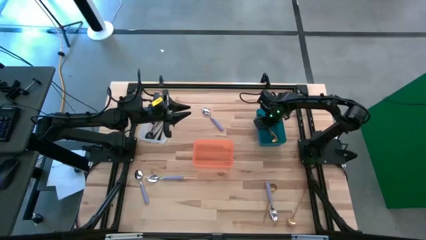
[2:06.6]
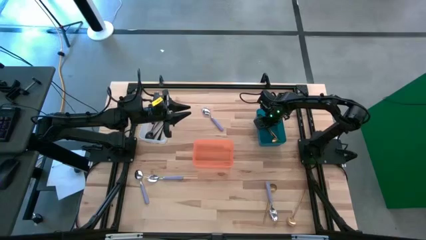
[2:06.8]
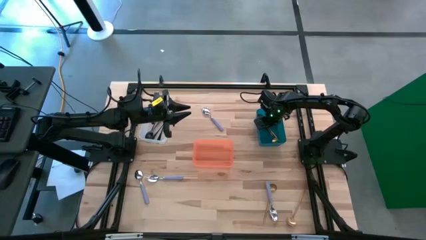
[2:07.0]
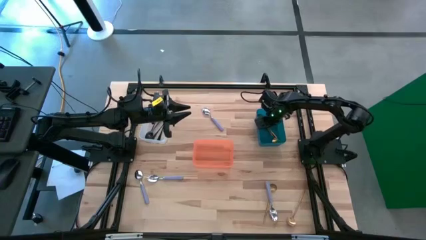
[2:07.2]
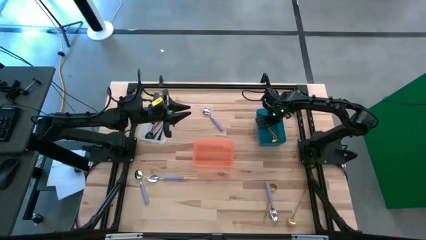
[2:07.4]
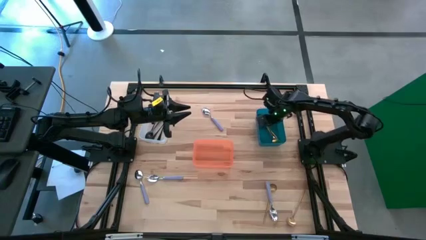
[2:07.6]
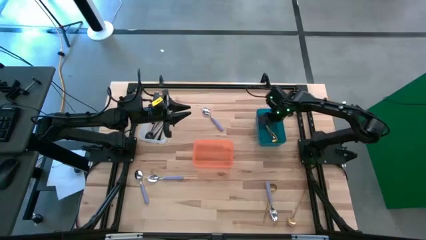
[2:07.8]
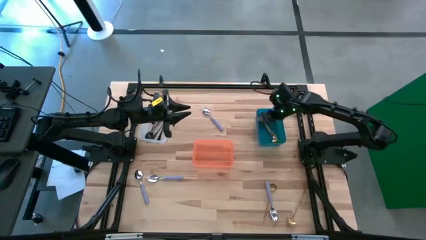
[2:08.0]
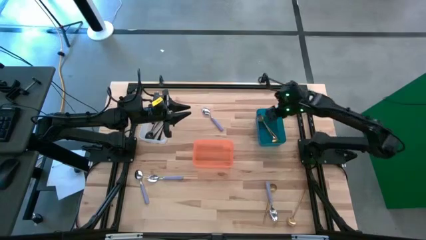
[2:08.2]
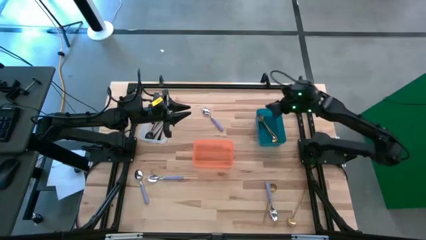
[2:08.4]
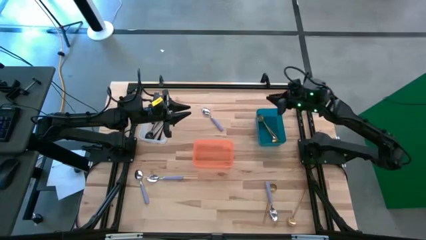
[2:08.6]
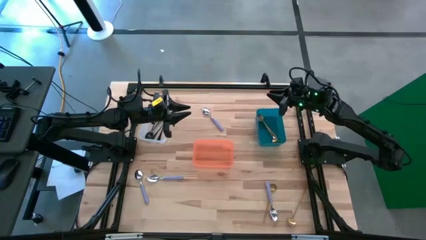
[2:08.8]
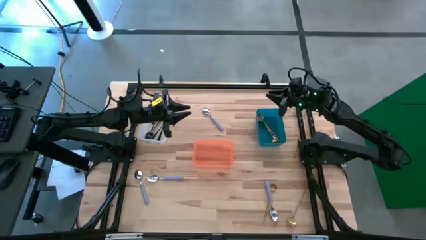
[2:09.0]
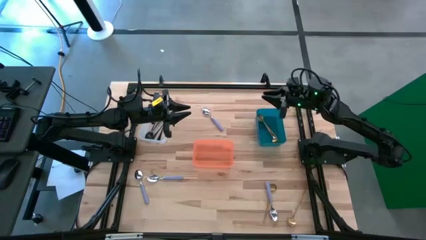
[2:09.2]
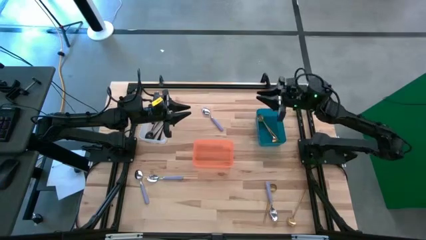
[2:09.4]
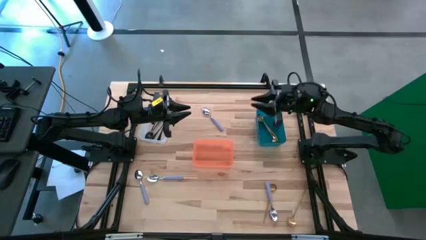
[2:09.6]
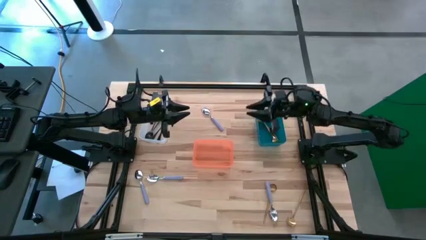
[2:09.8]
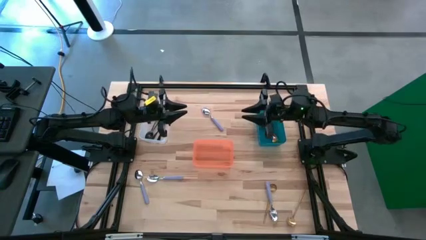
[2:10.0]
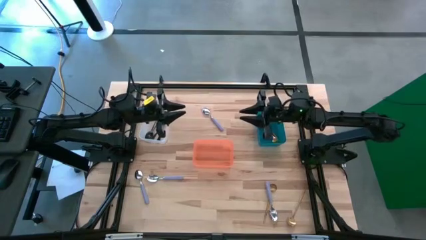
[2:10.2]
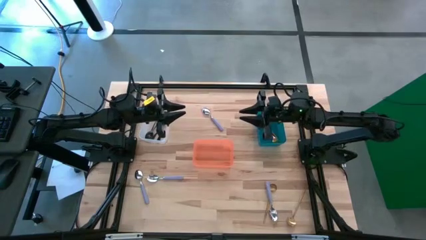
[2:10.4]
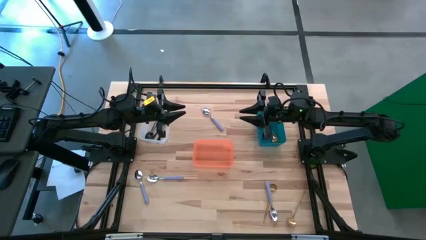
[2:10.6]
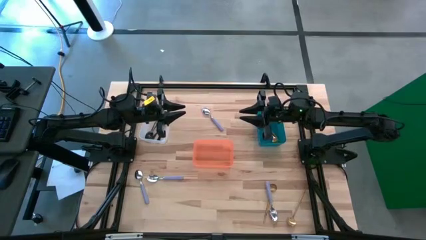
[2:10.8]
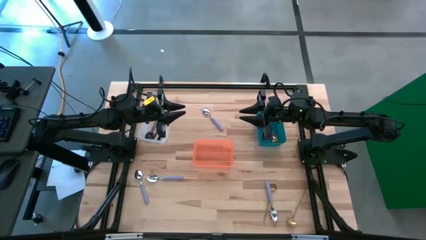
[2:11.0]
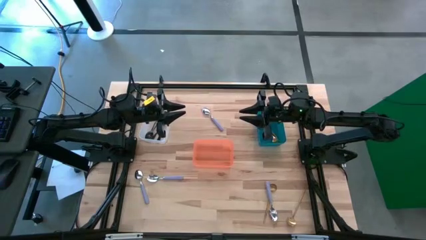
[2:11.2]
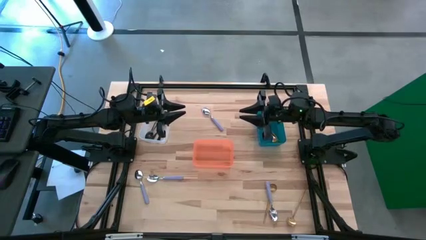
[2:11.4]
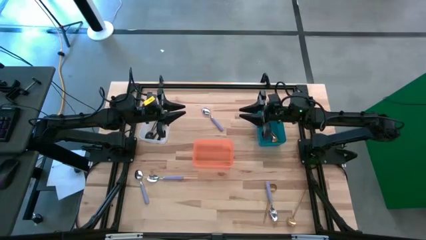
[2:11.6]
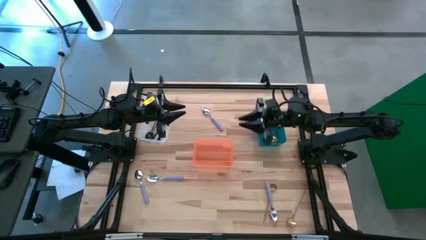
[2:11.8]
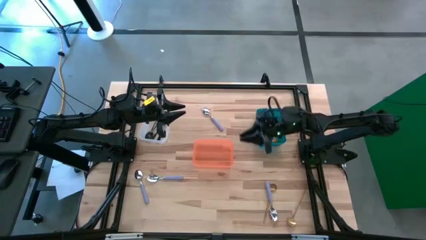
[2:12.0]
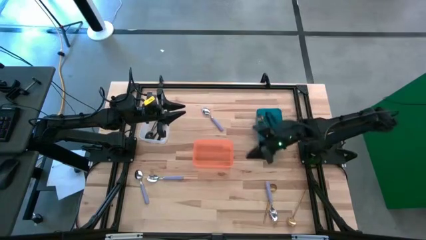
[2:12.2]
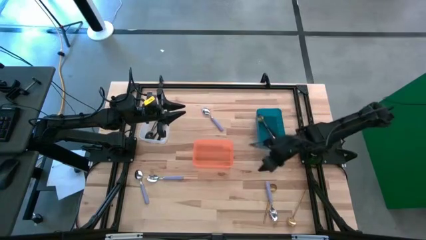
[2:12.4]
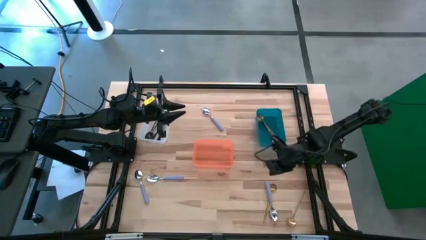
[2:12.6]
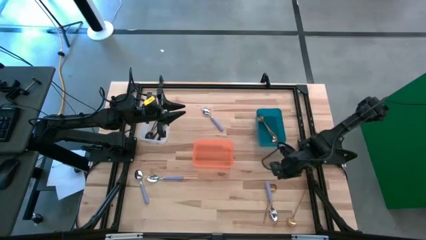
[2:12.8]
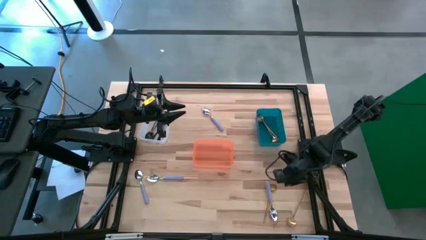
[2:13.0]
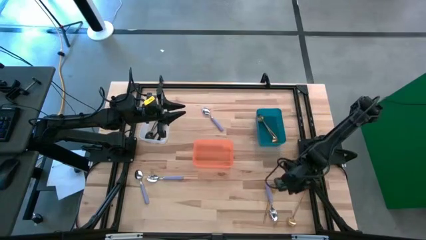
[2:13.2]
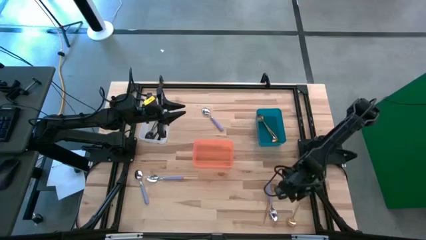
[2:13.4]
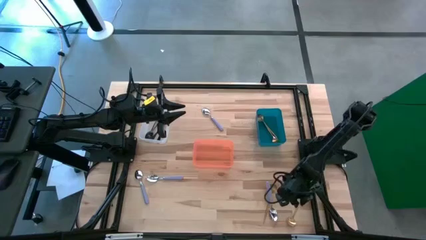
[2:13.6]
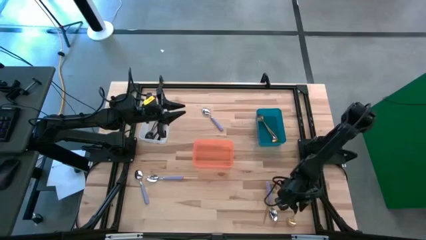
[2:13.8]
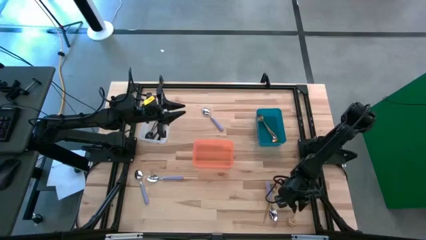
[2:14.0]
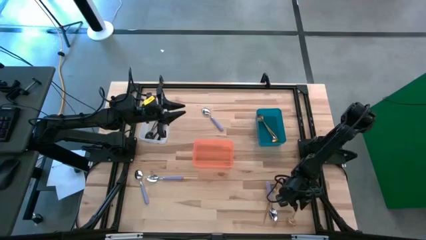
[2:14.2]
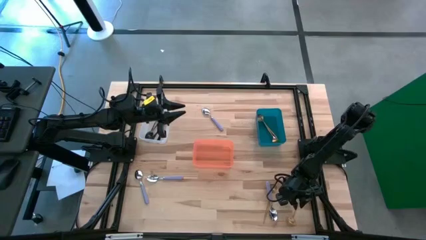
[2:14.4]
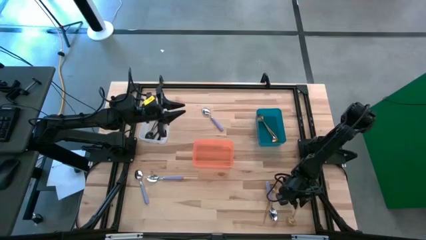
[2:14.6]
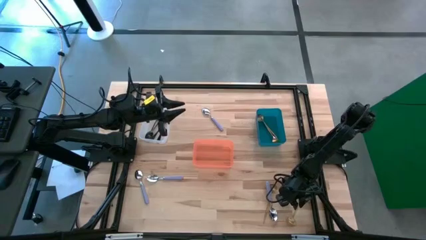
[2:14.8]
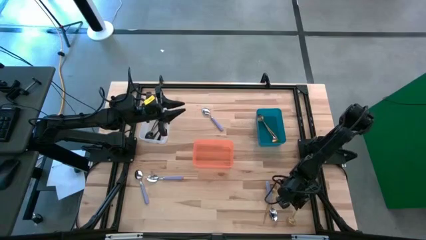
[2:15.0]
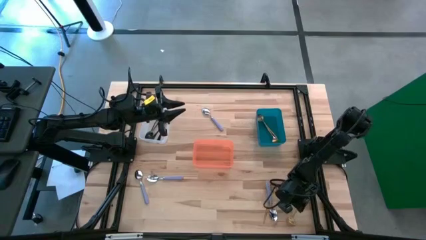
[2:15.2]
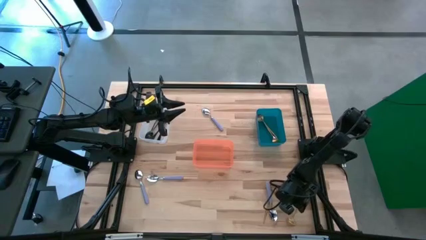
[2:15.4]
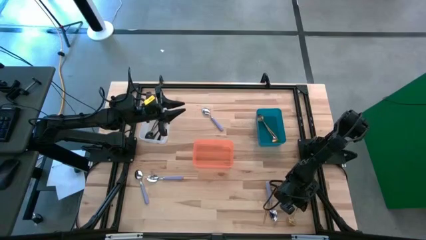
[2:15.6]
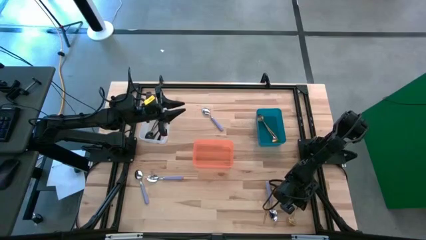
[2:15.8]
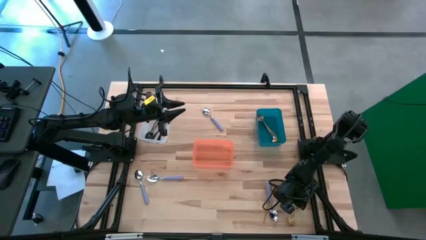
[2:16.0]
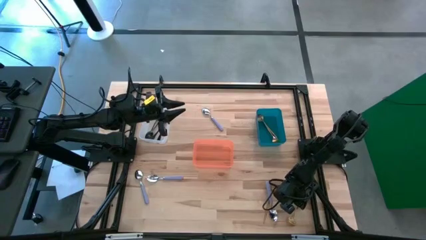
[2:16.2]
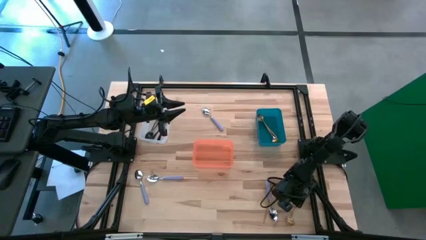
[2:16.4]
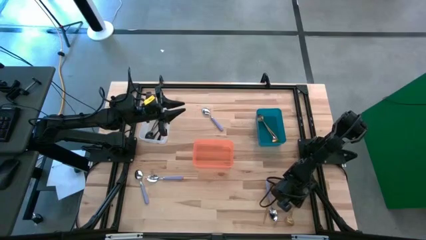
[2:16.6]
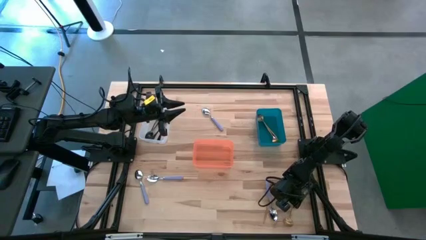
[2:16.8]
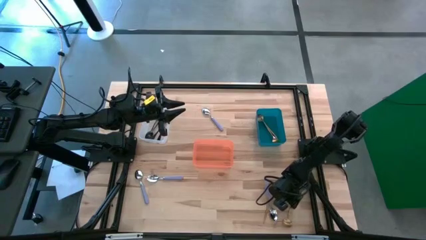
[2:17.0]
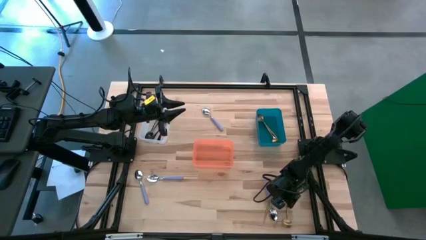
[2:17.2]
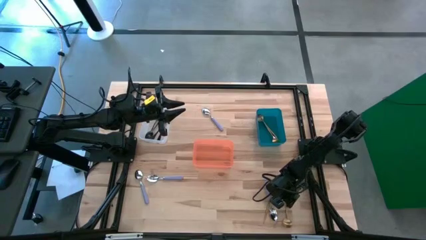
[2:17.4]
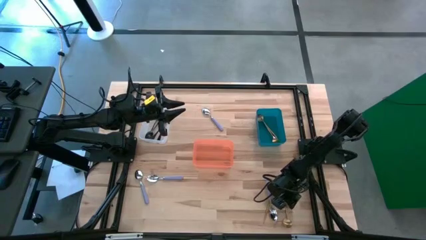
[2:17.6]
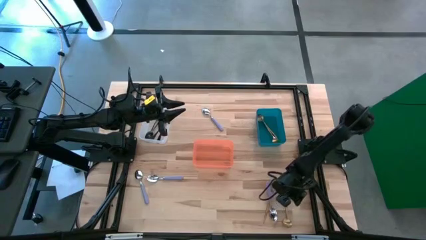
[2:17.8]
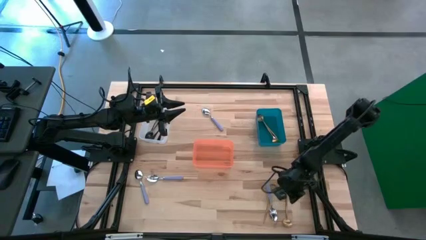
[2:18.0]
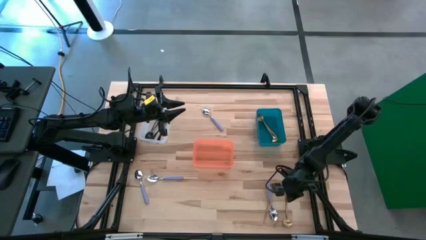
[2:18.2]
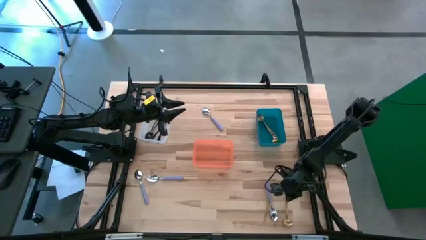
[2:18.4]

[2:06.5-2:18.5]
Task: Sort silverware by color (type)
Put the right gold spoon into the blue bin

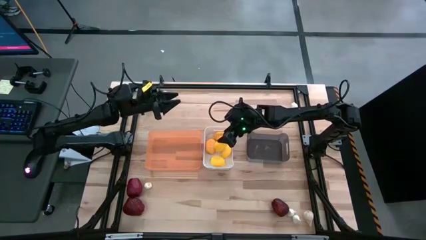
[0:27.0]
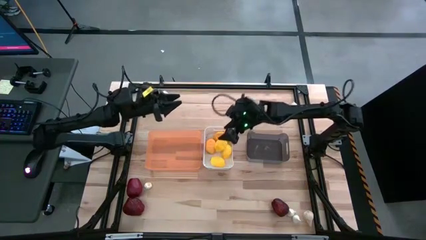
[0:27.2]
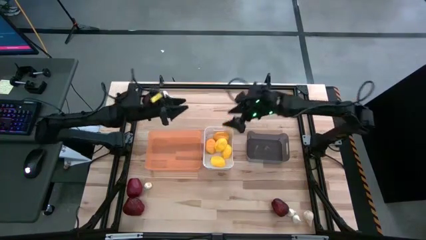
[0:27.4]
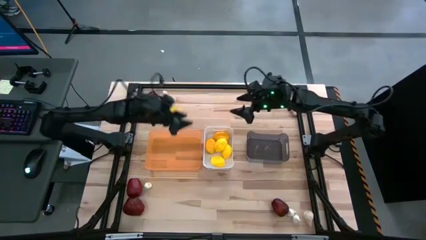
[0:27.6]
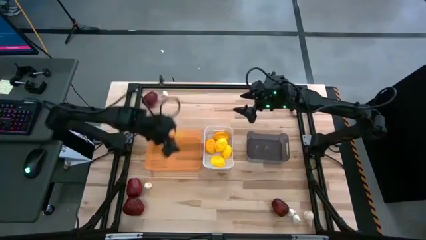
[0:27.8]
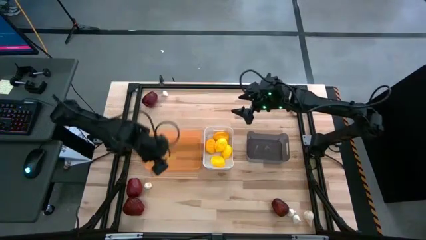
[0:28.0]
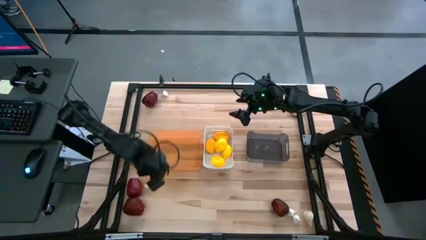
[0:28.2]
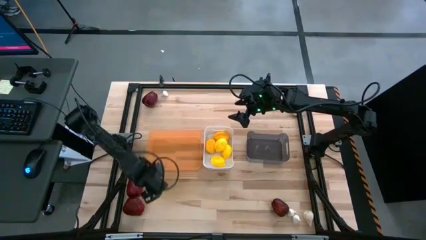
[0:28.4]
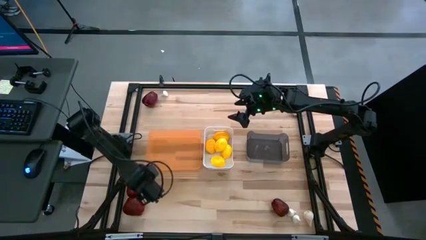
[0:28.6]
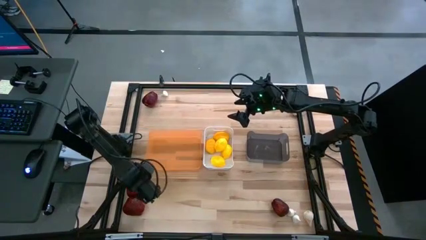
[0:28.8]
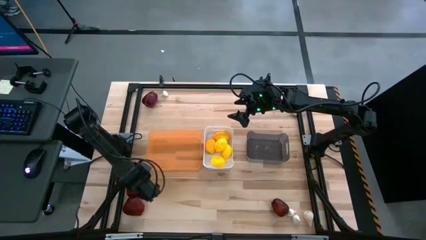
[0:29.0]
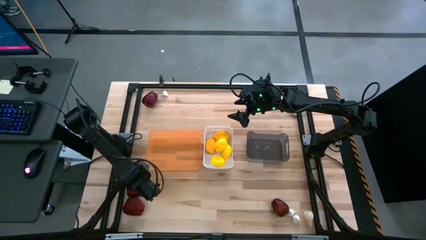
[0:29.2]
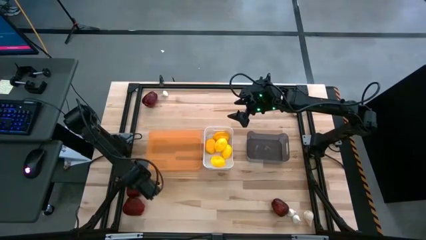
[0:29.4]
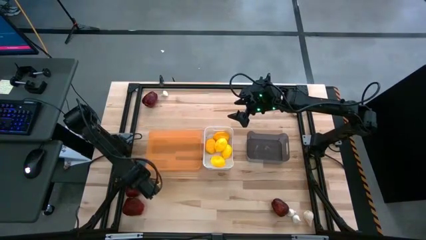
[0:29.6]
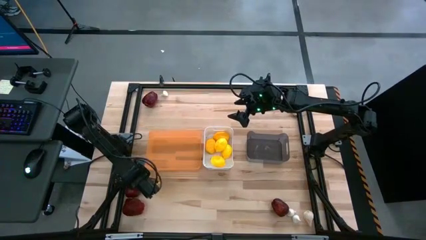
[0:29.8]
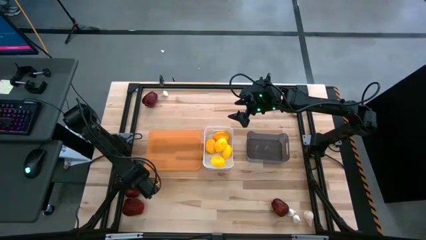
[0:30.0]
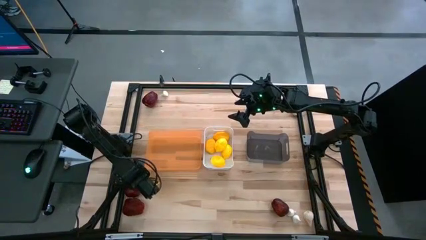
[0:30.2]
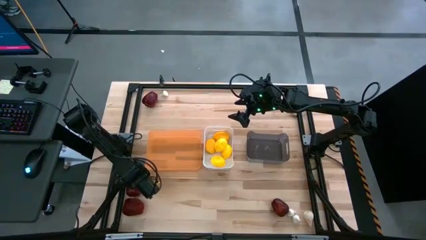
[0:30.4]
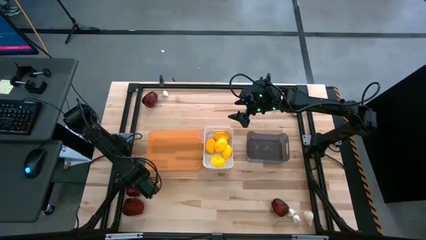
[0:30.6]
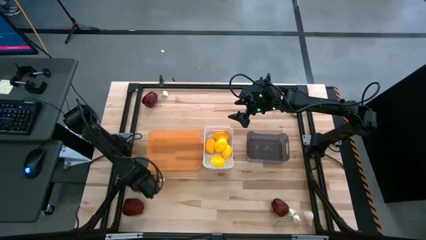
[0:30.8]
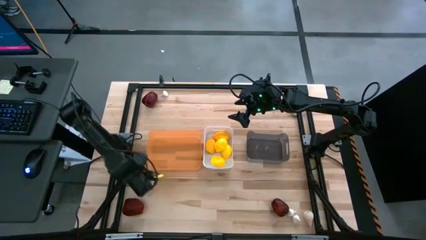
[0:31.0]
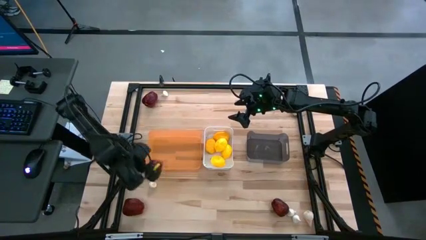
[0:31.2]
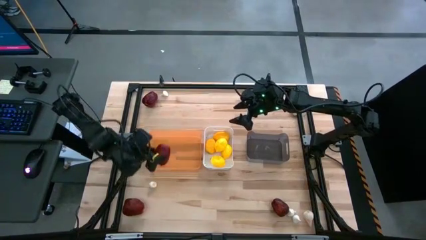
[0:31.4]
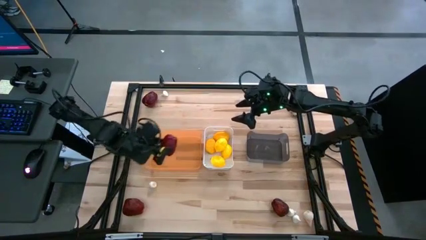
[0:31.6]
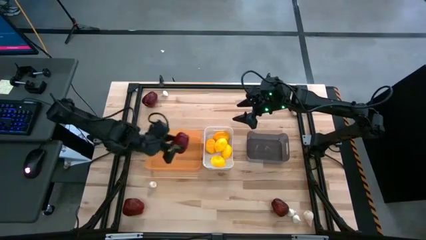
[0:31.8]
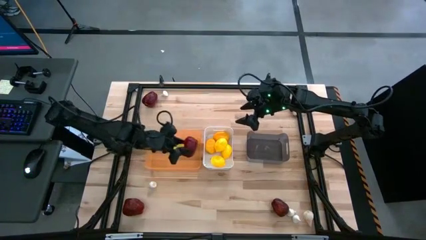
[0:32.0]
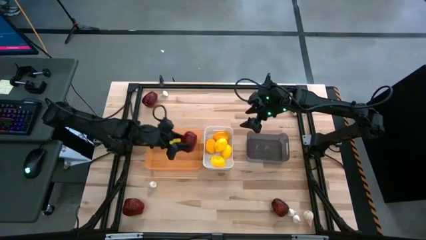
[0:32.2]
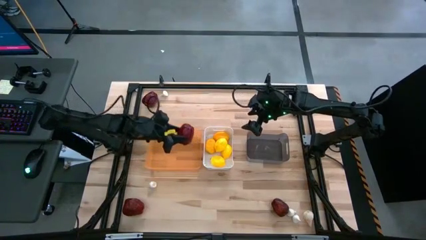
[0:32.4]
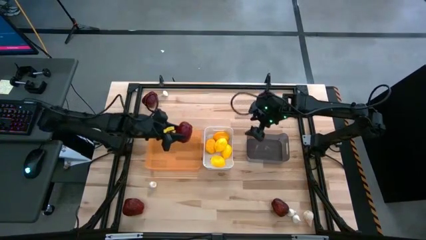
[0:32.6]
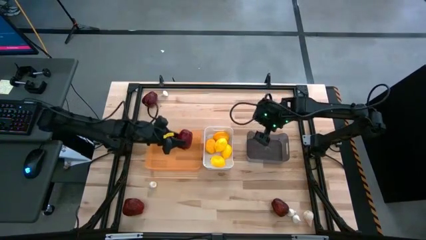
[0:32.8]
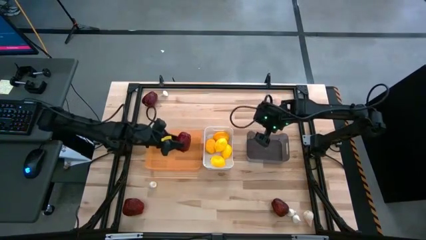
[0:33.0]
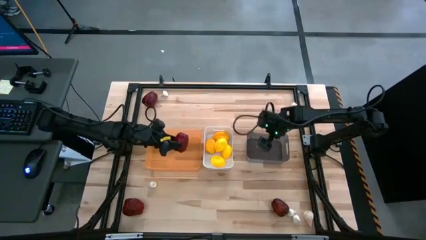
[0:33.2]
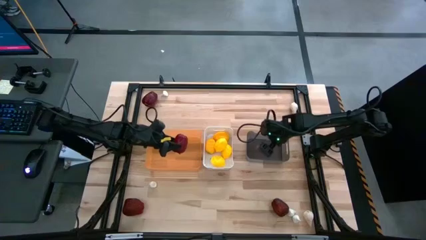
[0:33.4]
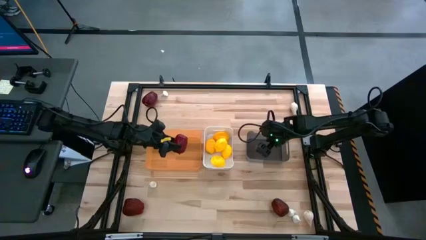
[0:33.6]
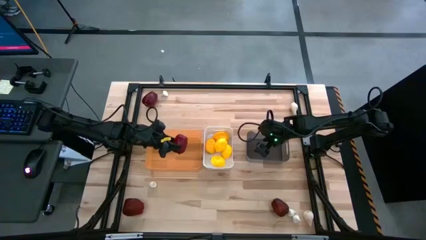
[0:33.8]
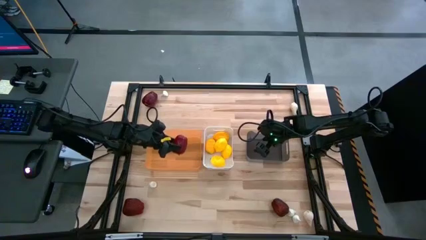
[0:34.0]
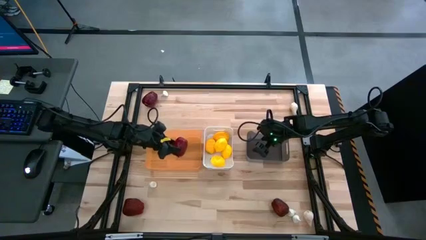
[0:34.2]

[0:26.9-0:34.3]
Task: Sort produce into baskets
Put the red apple into the orange bin
